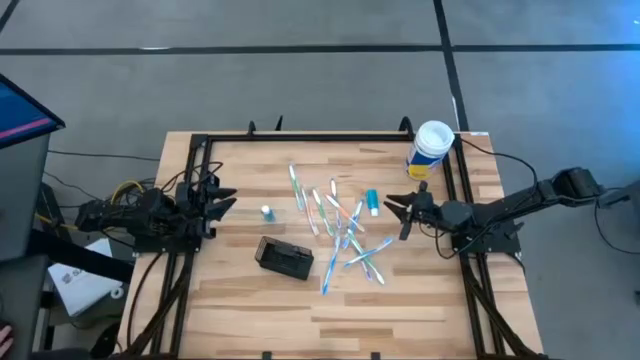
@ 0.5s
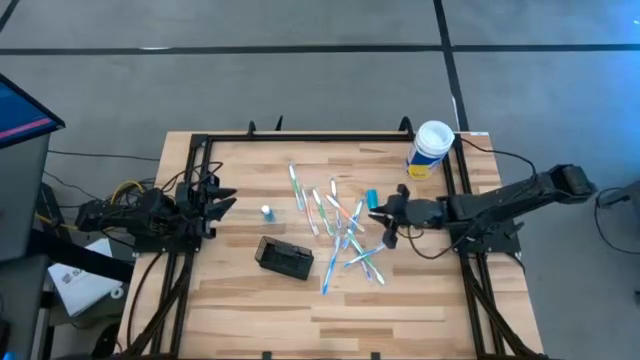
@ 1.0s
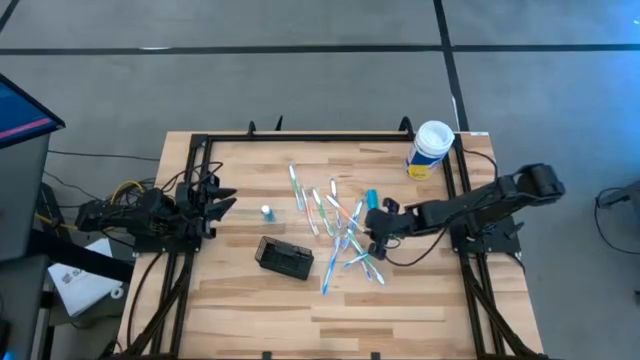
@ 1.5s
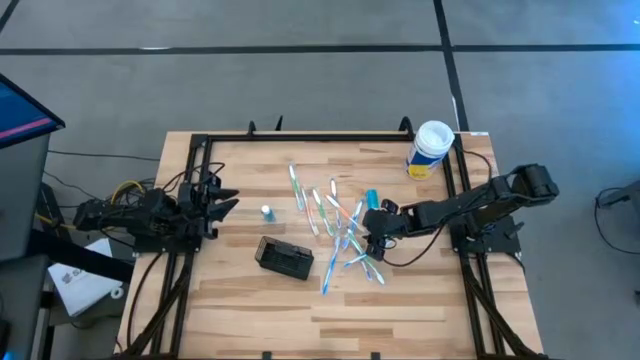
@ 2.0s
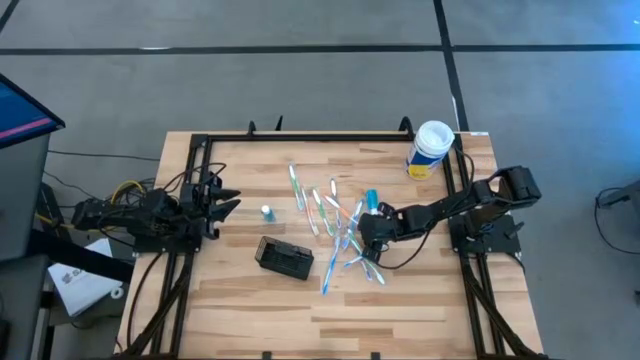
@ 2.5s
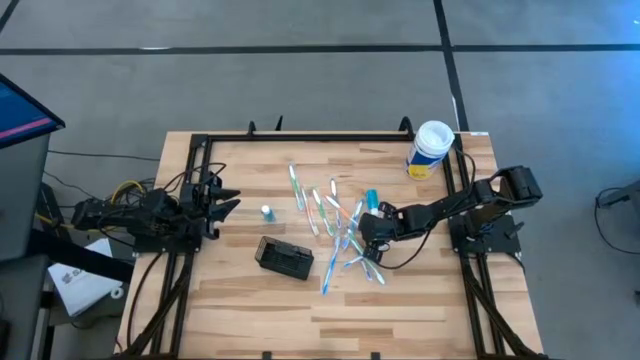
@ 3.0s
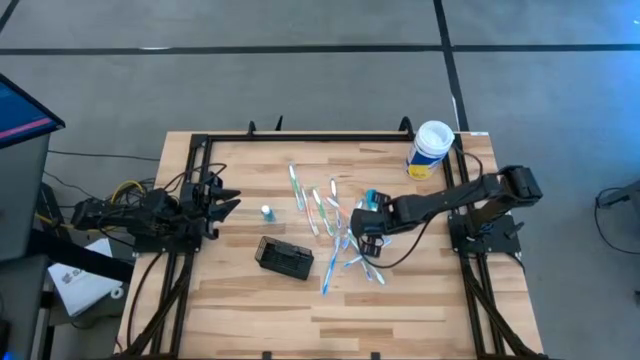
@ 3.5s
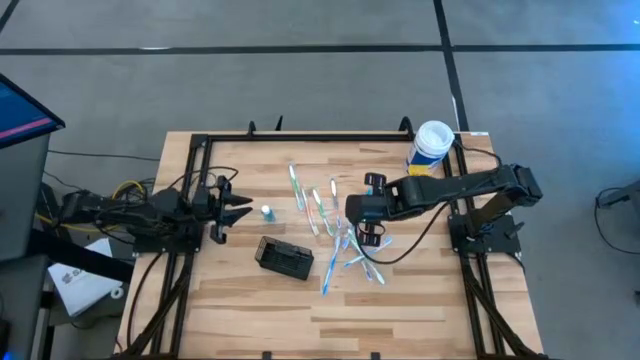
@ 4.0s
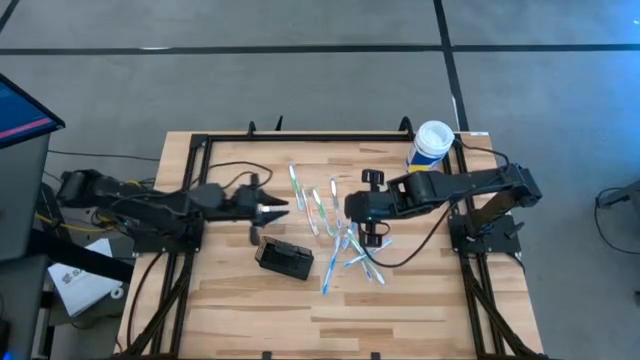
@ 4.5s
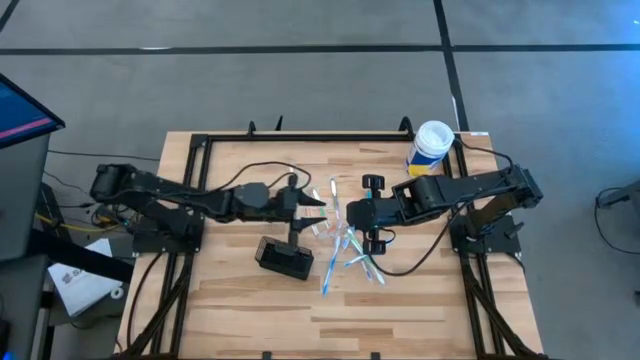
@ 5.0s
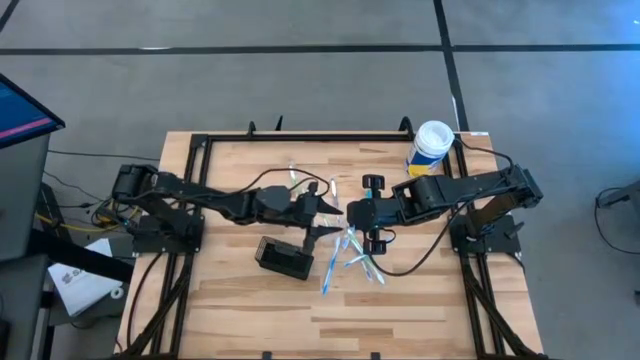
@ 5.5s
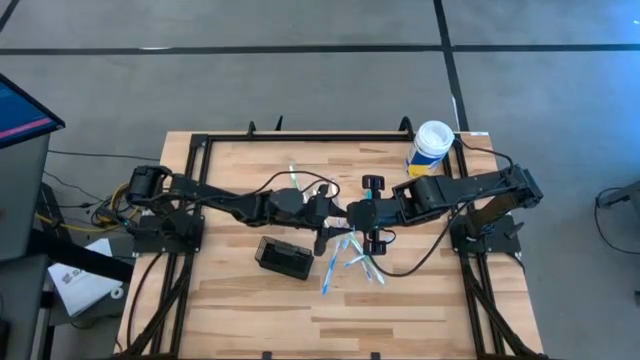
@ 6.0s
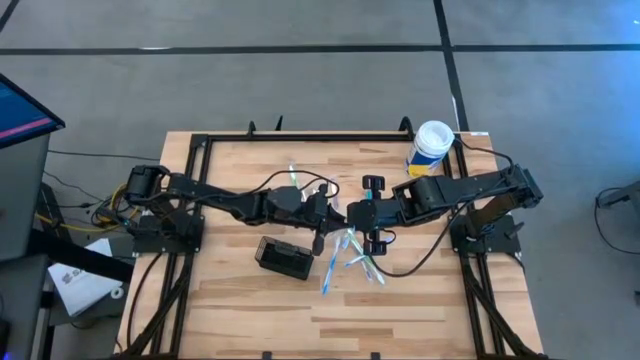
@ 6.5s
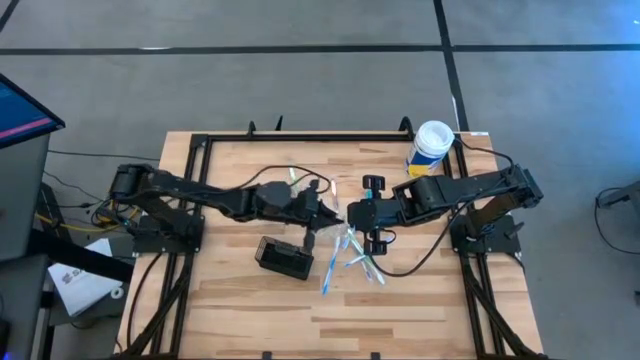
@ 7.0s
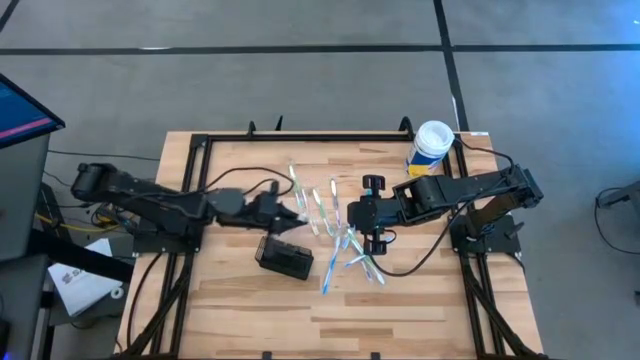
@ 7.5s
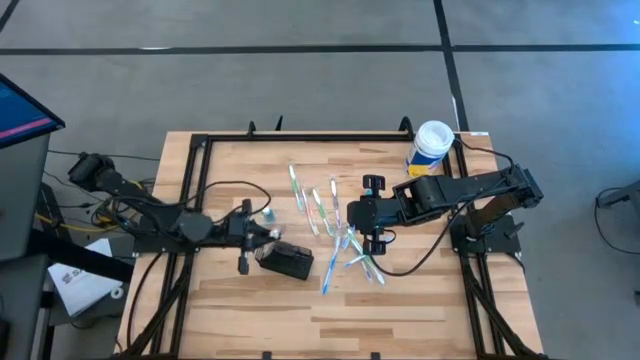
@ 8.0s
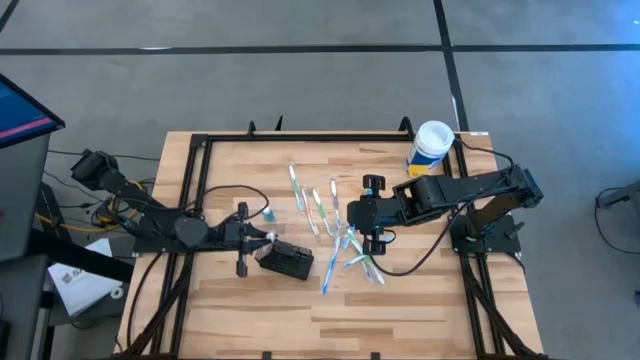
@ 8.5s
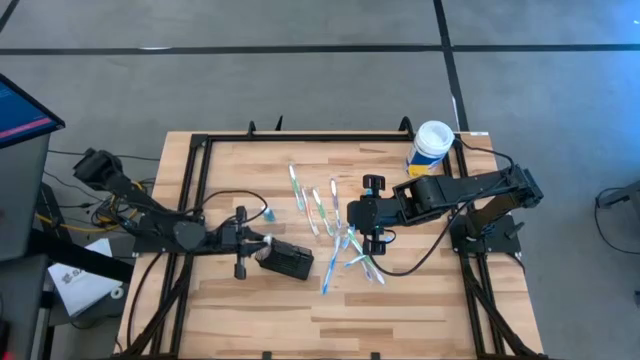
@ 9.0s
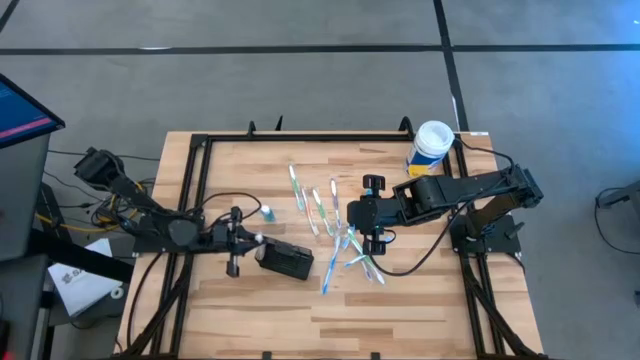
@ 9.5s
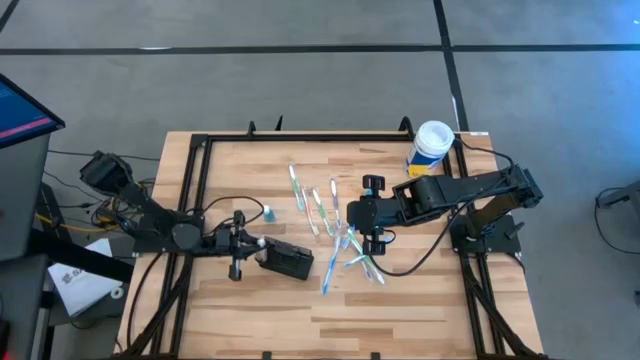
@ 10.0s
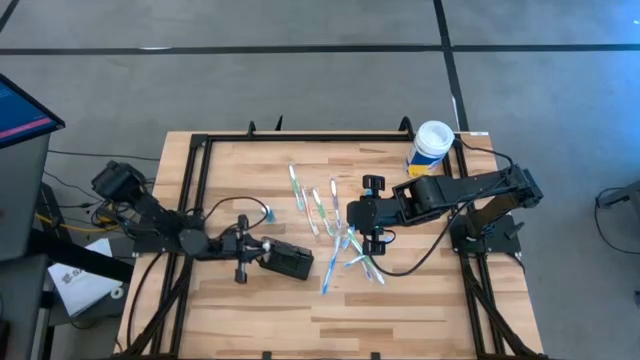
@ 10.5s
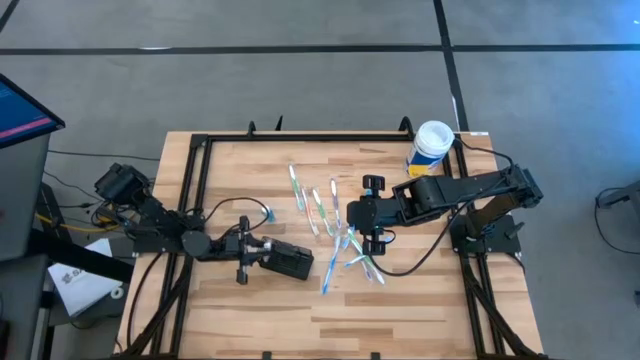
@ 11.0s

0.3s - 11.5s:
Task: Pick & Place toothbrushing station
Put the right orange toothbrush into the wire organizer

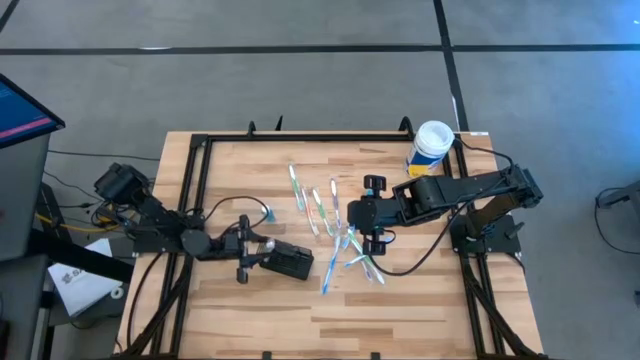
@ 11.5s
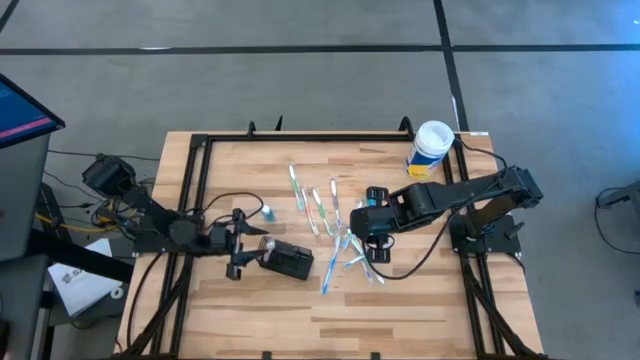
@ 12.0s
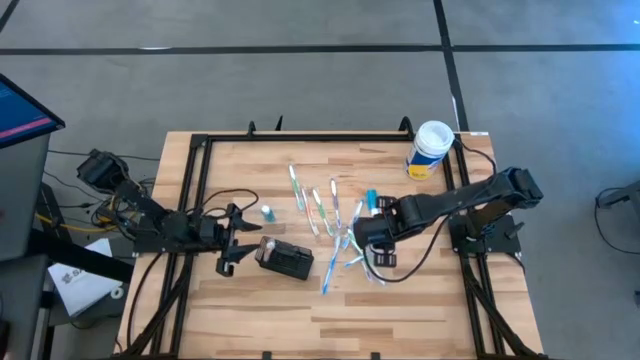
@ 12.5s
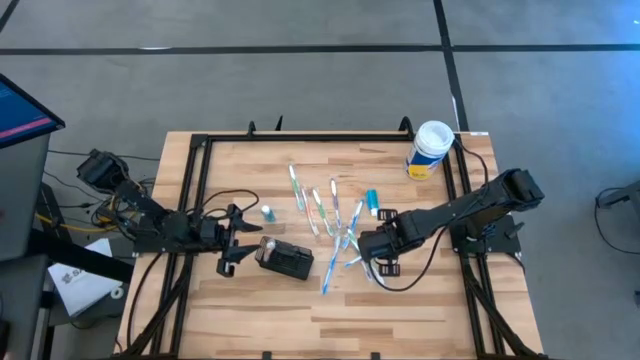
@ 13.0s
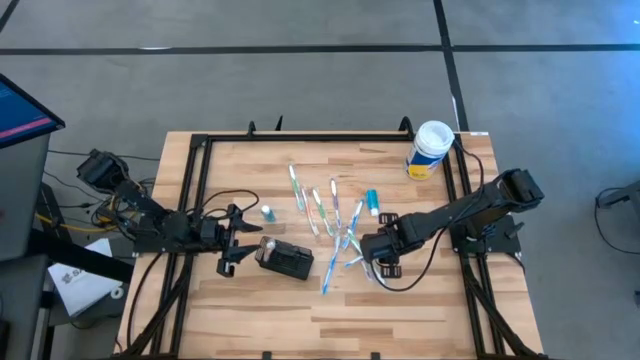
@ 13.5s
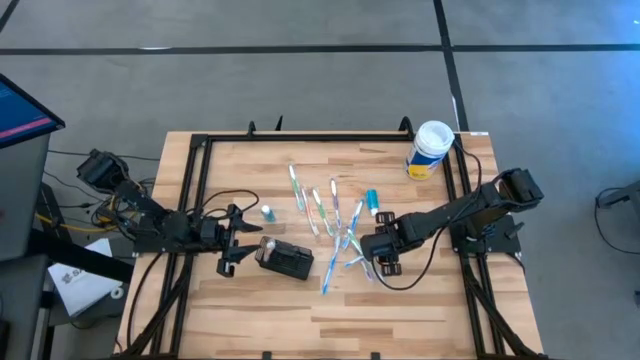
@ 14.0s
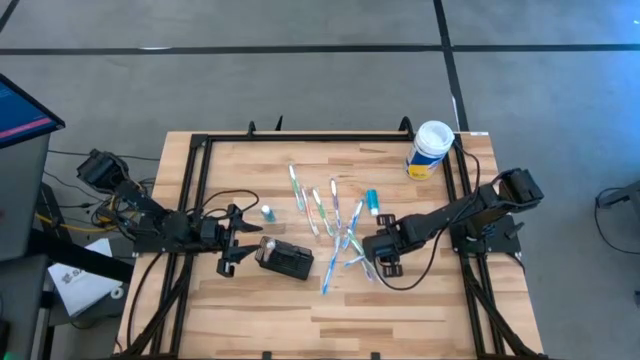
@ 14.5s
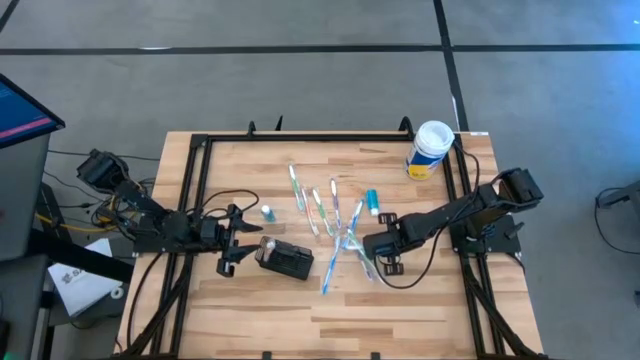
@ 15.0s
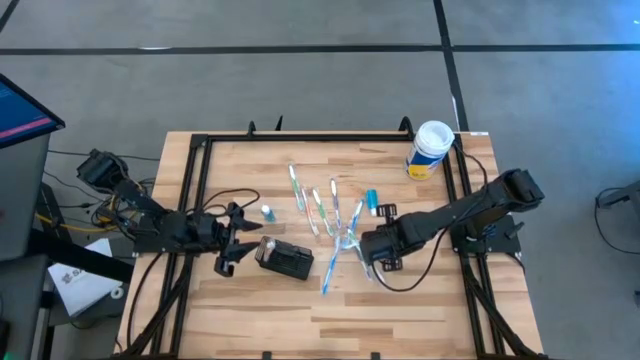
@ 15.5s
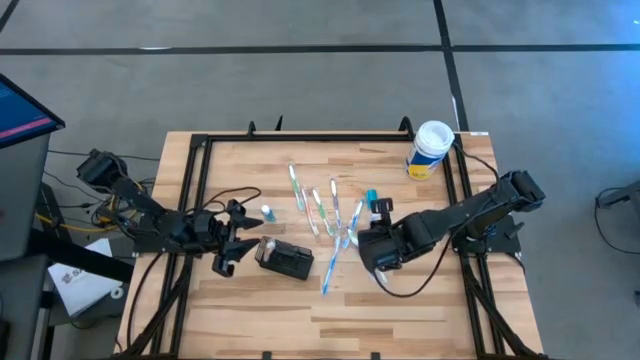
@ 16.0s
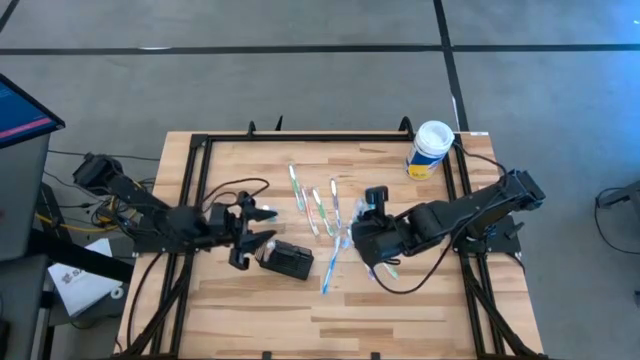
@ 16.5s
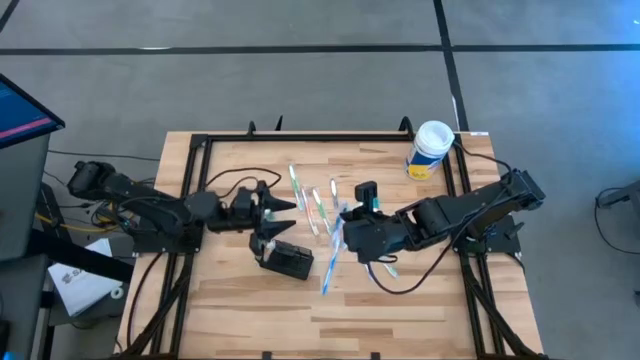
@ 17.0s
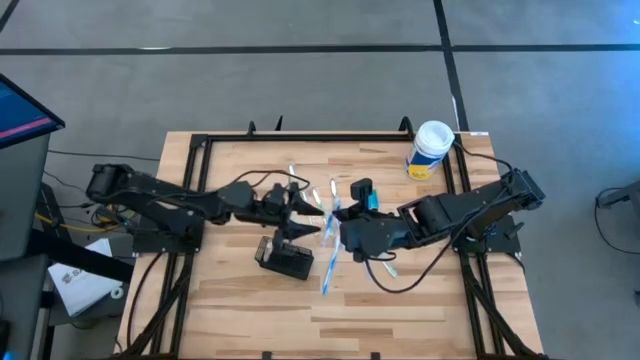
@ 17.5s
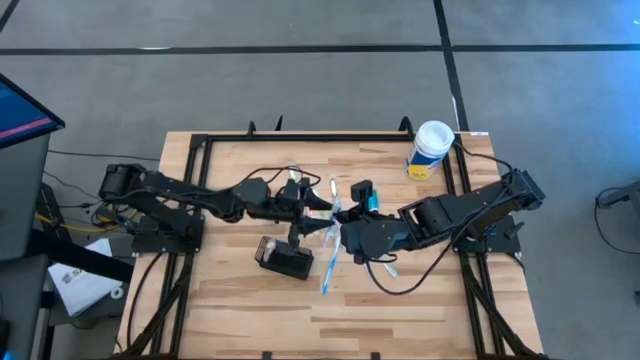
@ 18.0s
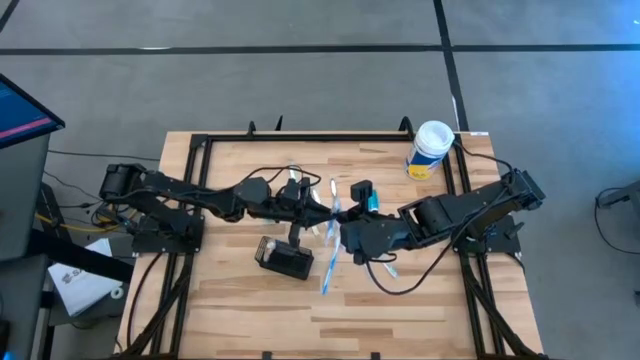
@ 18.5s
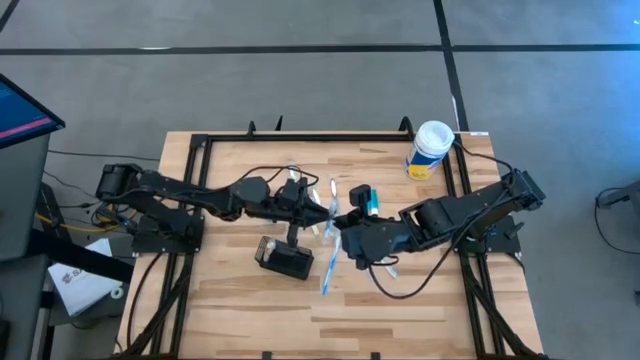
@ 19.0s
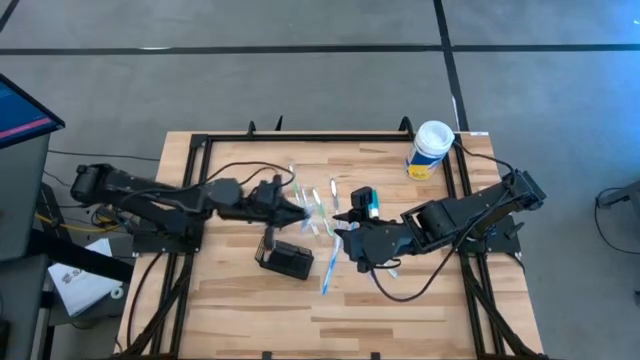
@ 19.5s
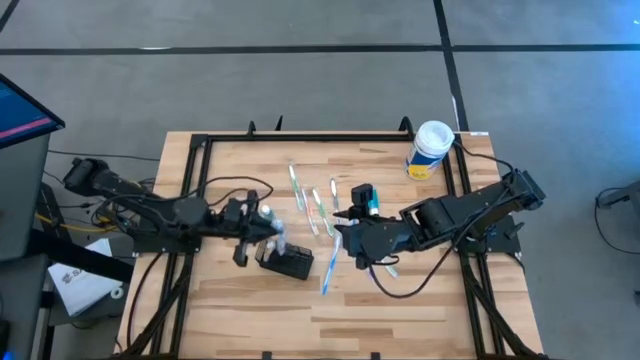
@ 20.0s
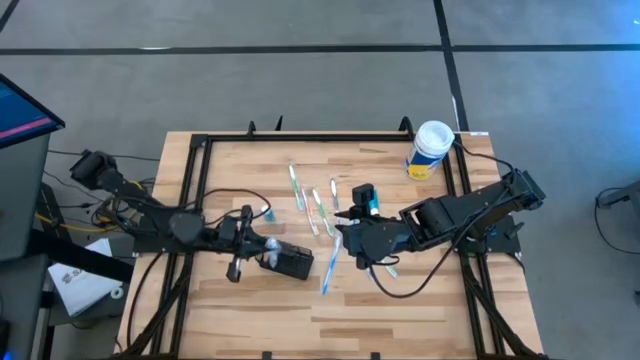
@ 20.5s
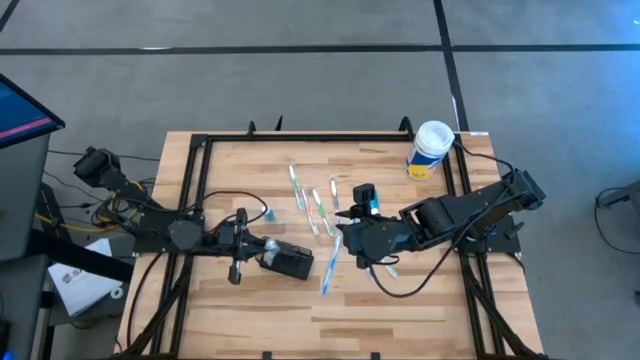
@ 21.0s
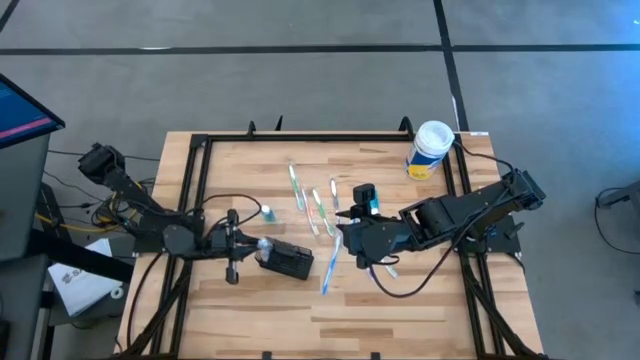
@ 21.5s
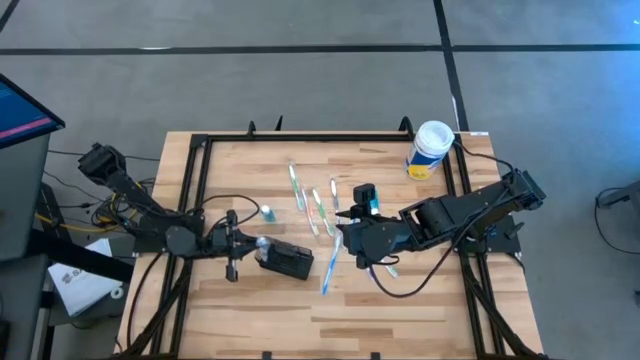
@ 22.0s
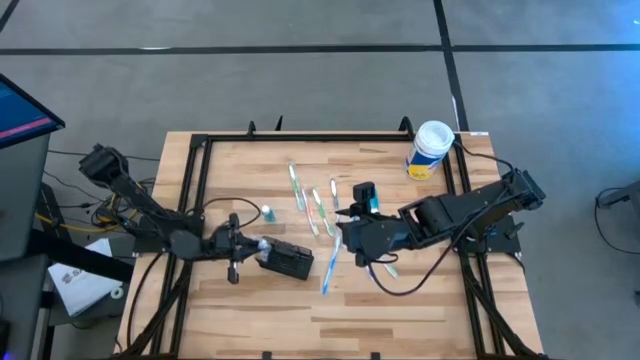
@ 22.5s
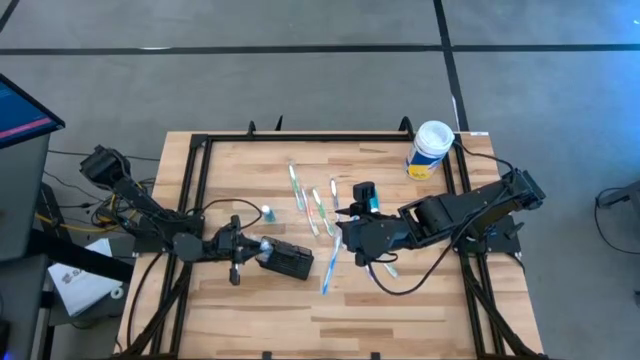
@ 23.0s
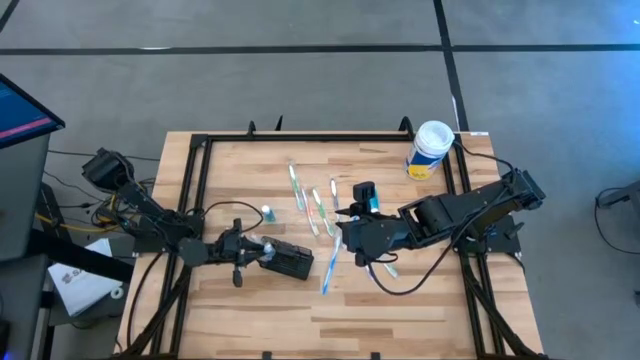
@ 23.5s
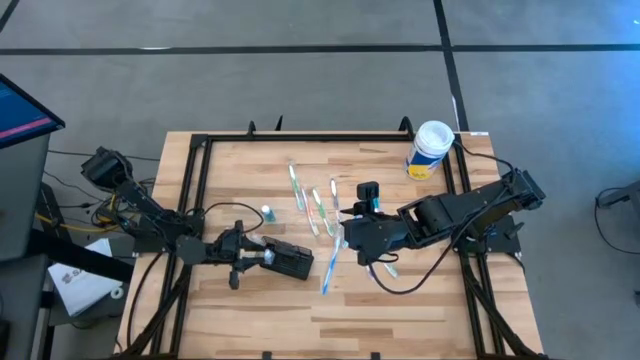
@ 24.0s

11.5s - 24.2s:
Put the bottom right blue toothbrush into the wire organizer
